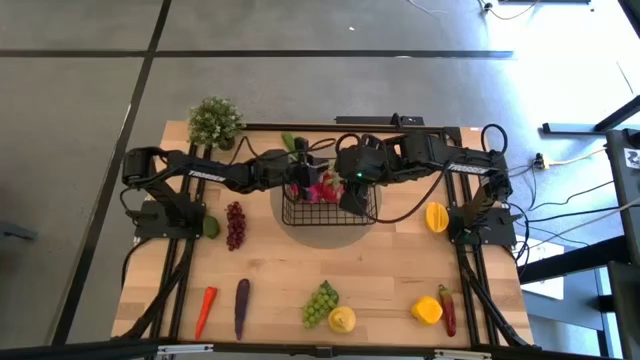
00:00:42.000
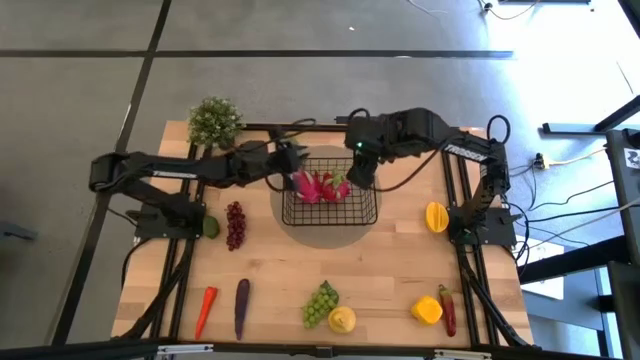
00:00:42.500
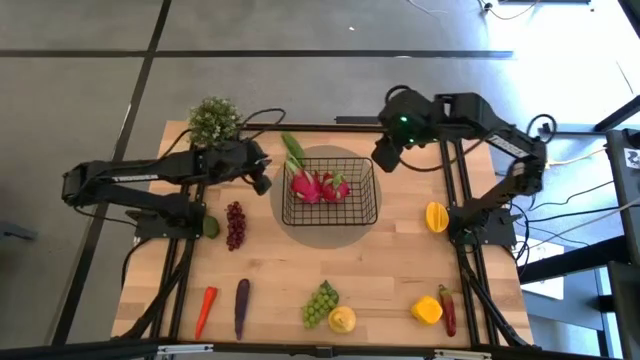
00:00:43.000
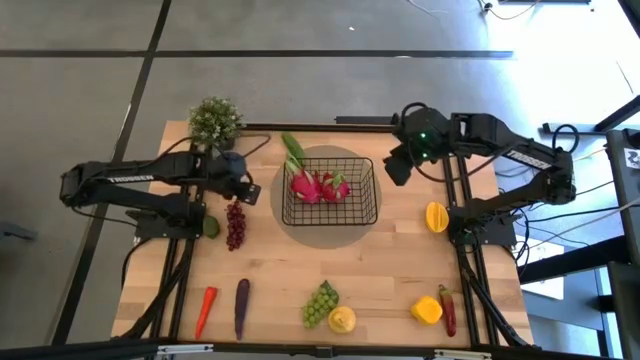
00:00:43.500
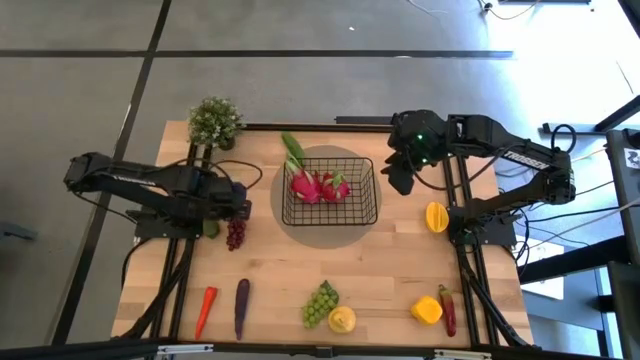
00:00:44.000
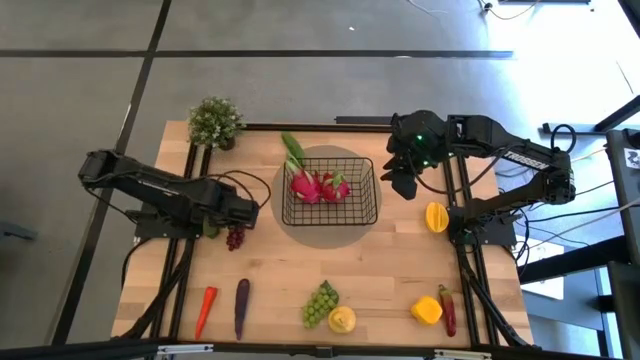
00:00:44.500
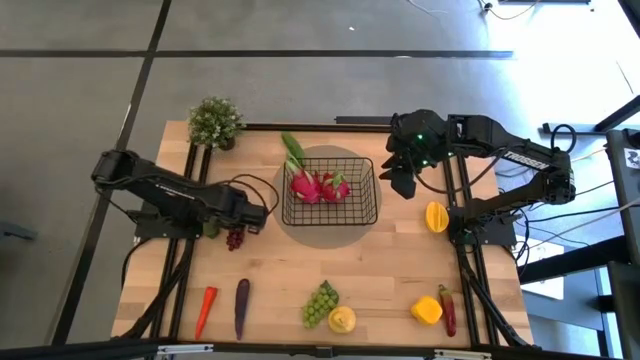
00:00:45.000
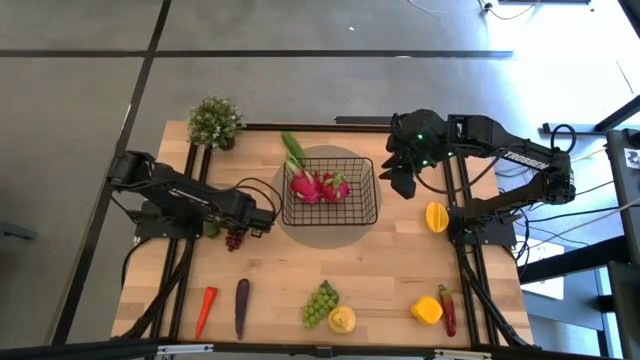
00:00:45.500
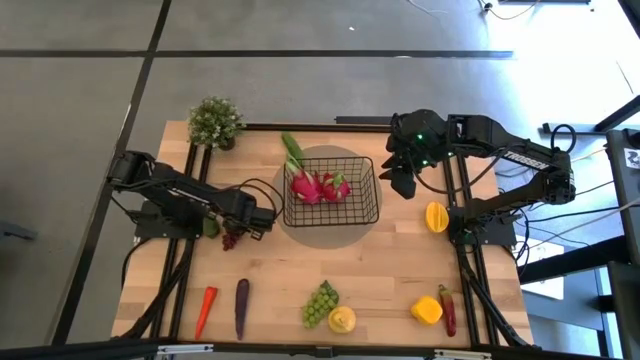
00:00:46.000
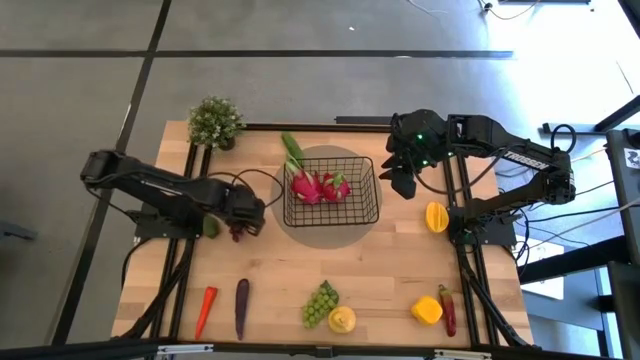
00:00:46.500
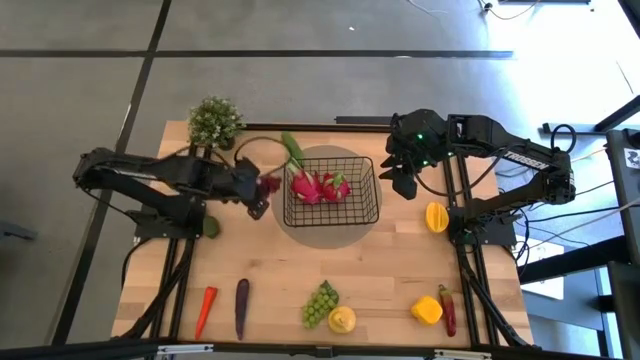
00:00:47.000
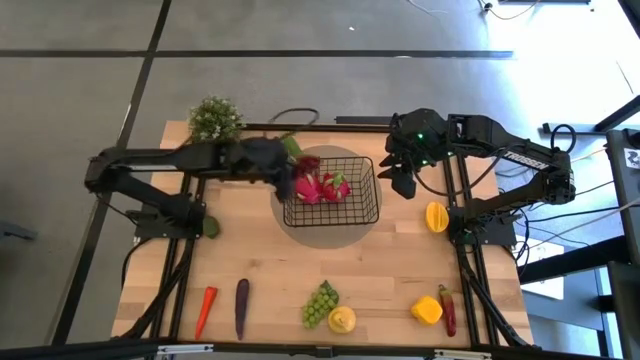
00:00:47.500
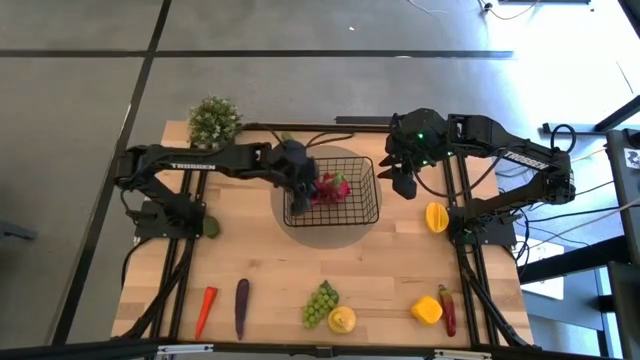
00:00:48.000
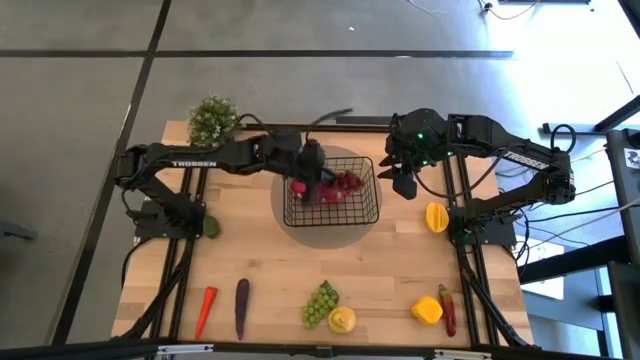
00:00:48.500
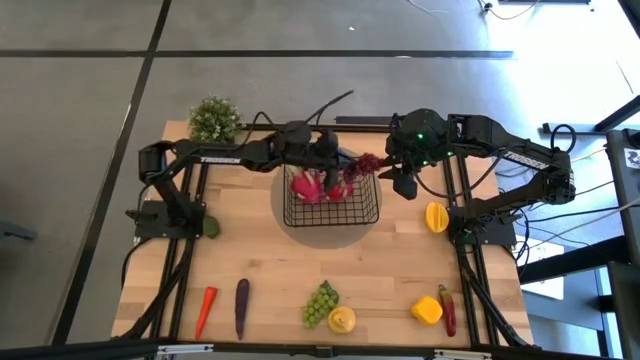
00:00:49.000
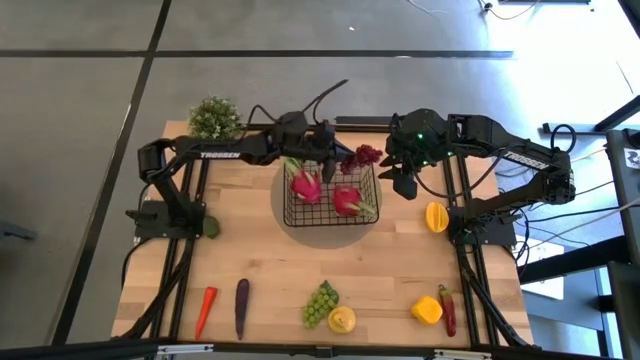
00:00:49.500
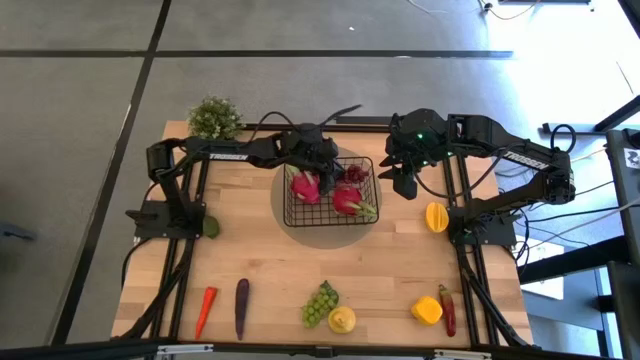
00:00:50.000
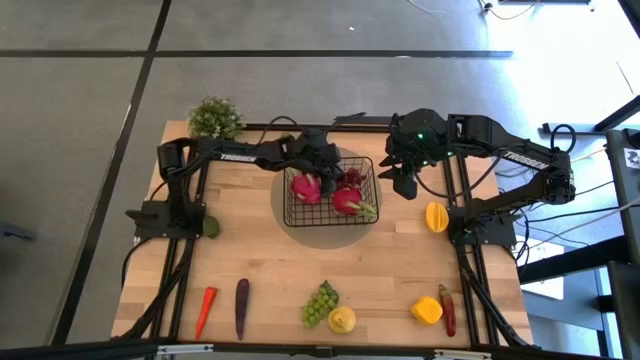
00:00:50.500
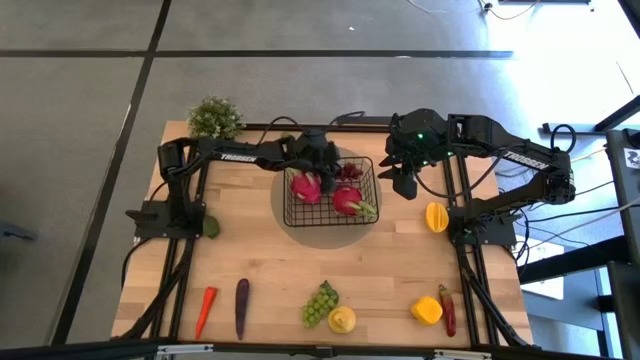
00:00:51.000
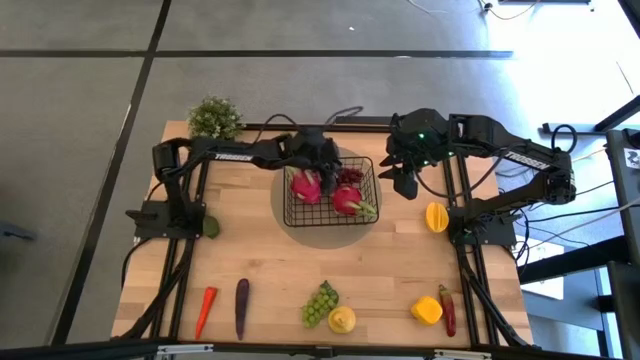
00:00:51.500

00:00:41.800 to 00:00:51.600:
Task: Build produce basket
Put the dark red grapes into the black wire basket

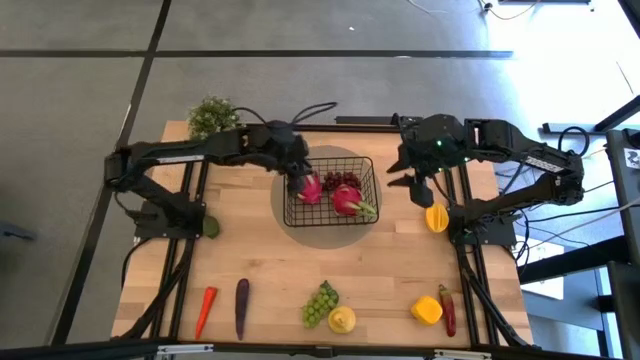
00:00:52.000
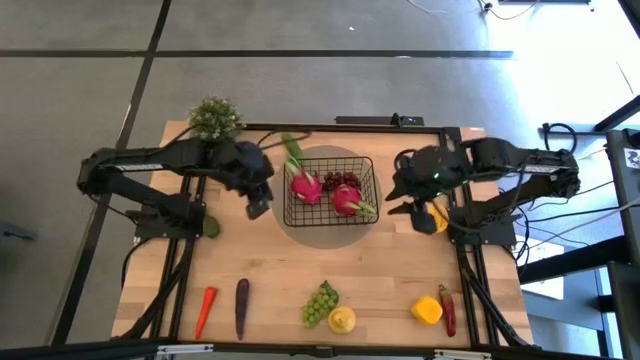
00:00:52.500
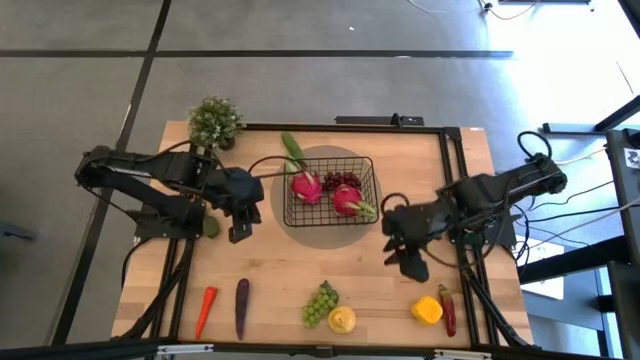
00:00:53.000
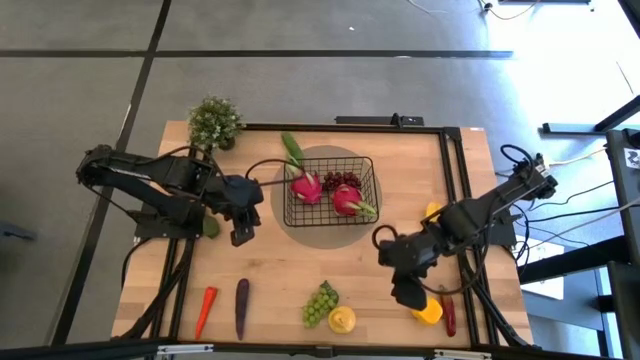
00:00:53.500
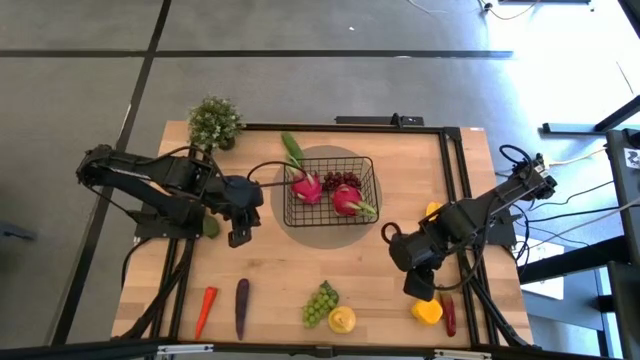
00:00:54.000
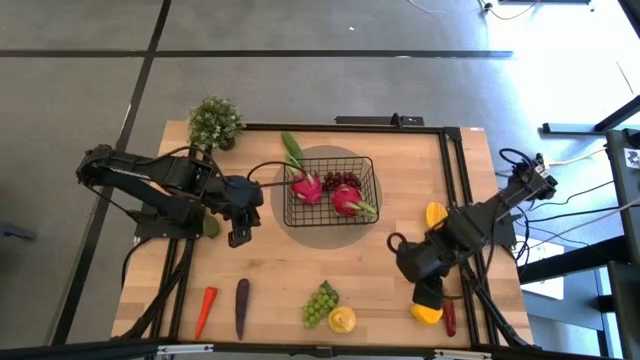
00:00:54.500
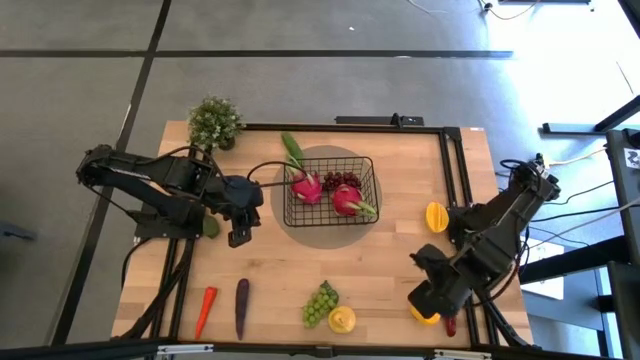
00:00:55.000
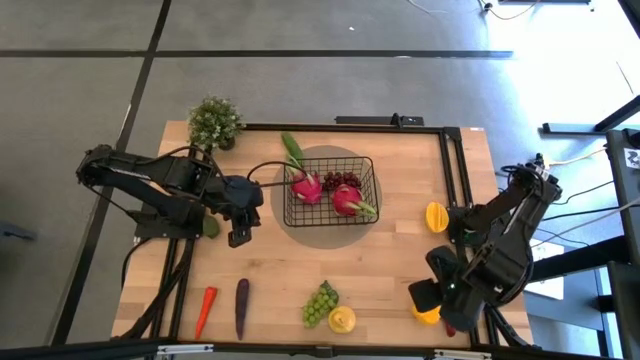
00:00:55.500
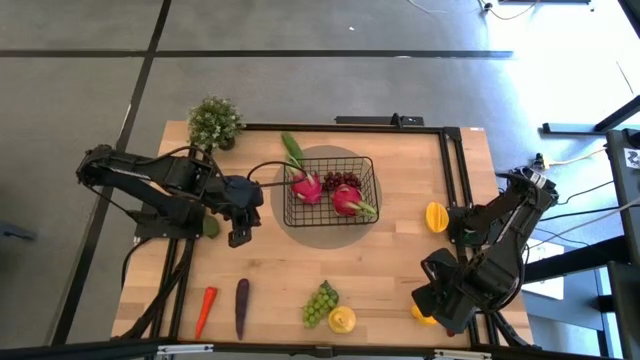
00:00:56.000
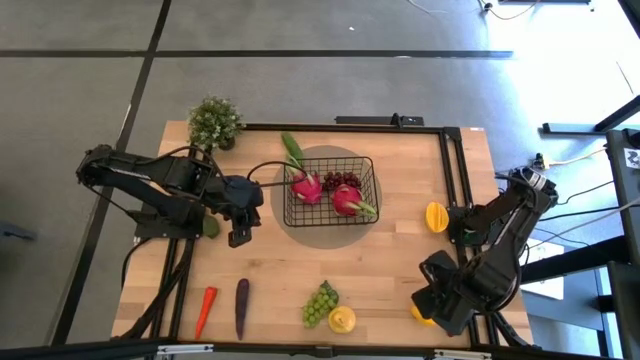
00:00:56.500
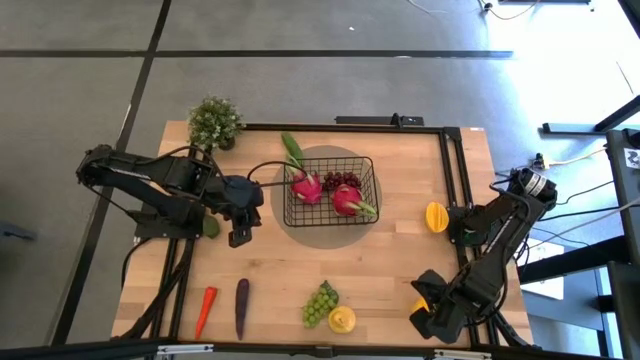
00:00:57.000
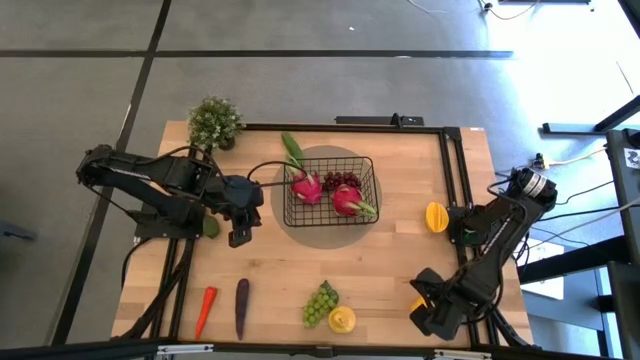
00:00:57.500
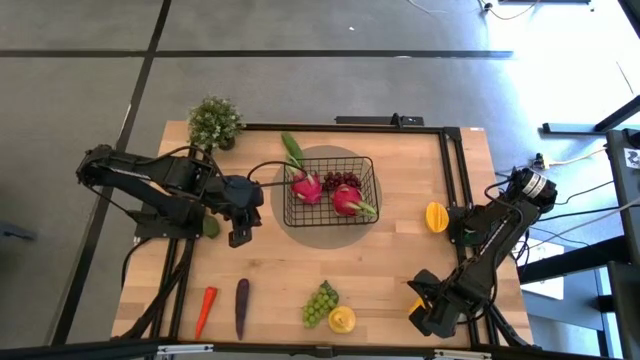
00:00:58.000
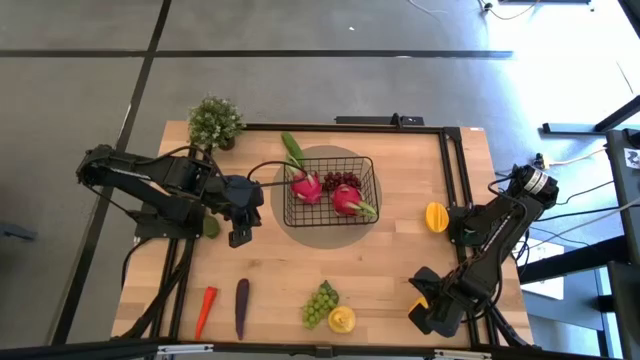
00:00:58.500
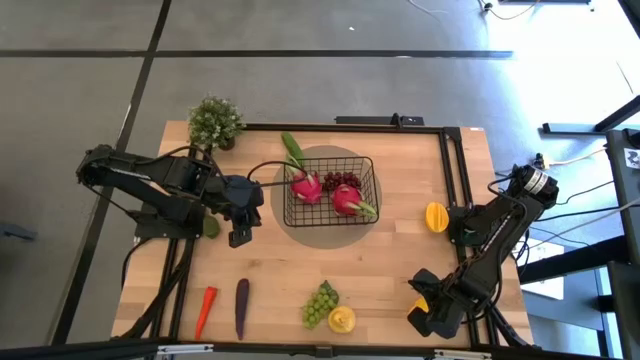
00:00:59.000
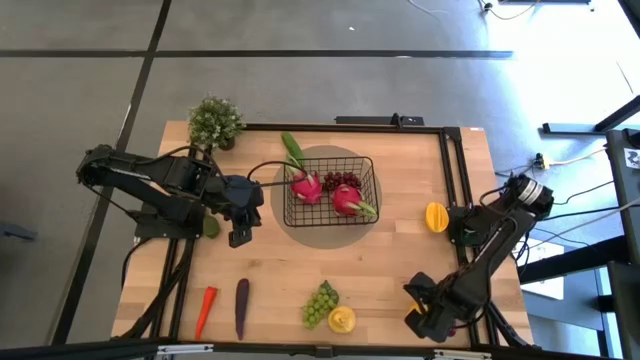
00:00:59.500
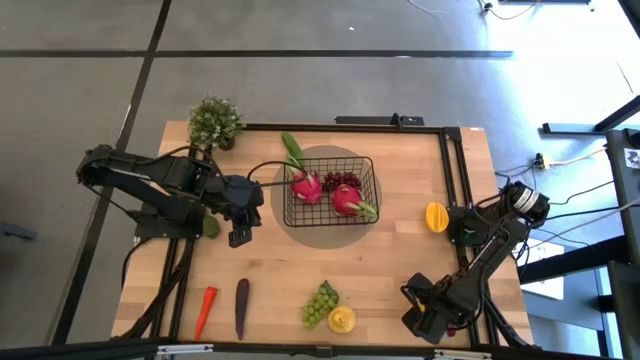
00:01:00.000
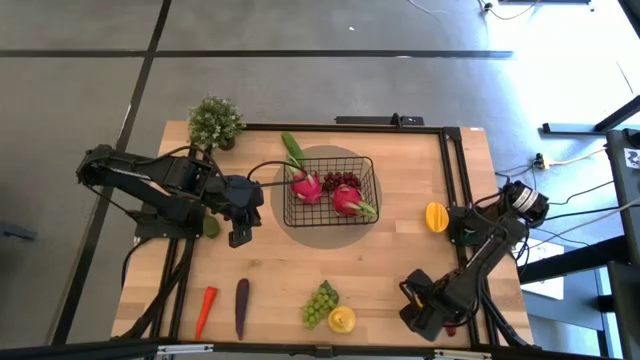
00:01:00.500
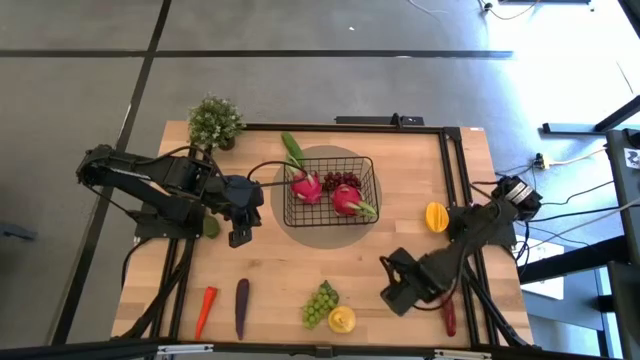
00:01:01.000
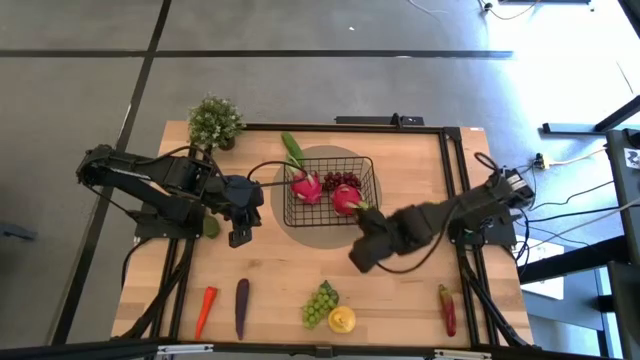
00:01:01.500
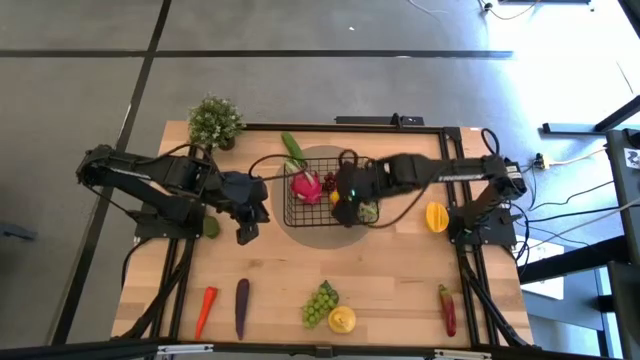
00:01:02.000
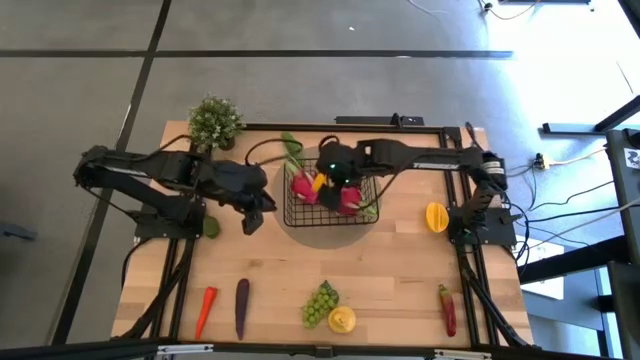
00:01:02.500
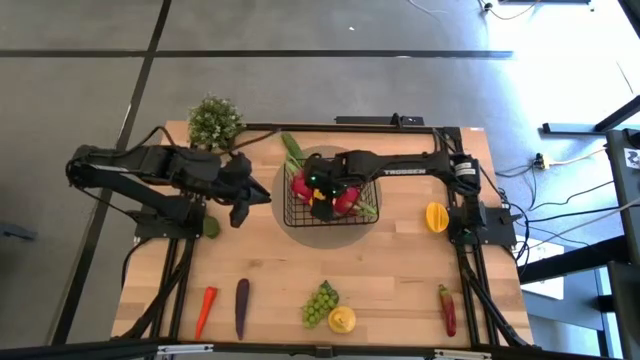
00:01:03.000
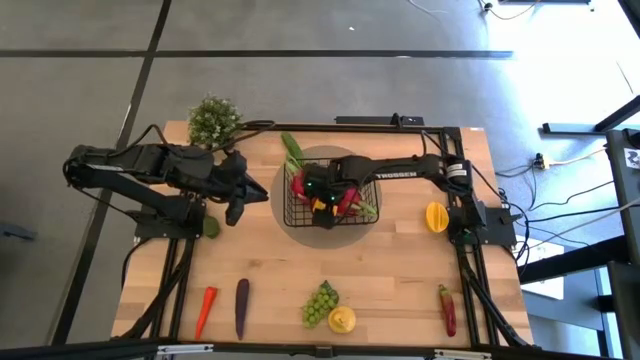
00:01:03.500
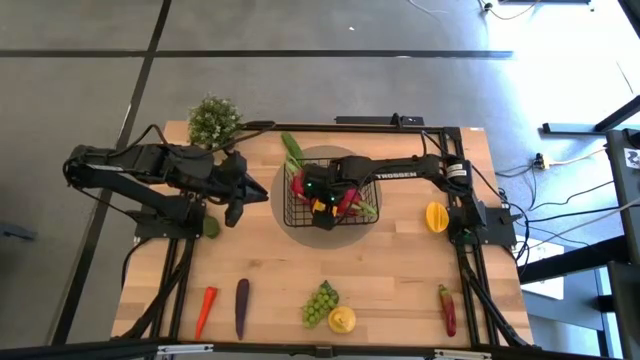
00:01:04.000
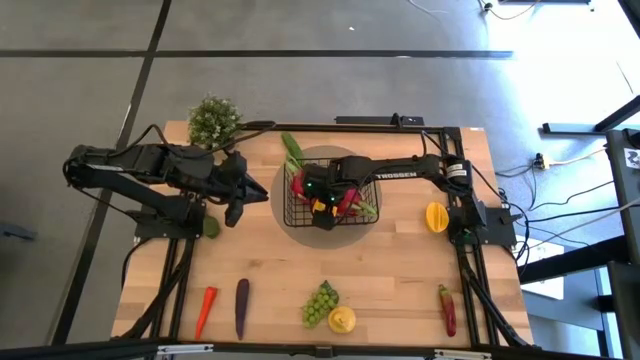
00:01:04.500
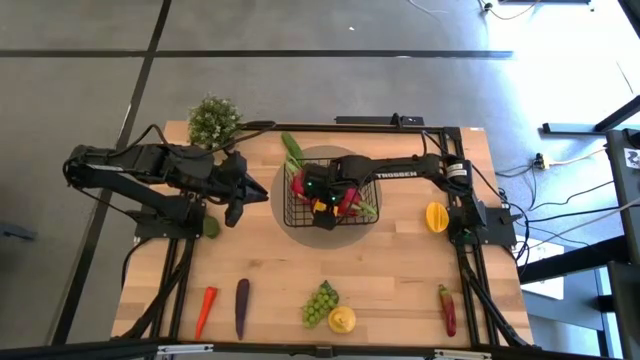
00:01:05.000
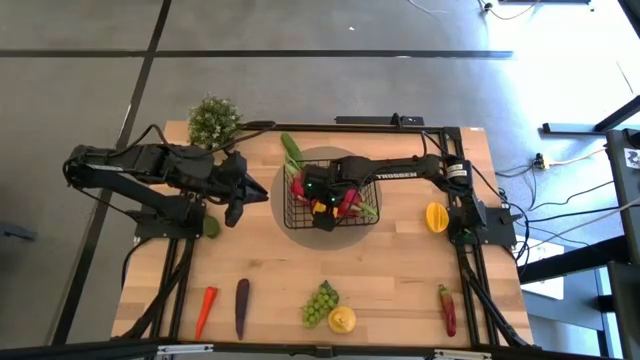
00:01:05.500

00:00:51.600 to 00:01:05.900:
Put the yellow bell pepper into the black wire basket
